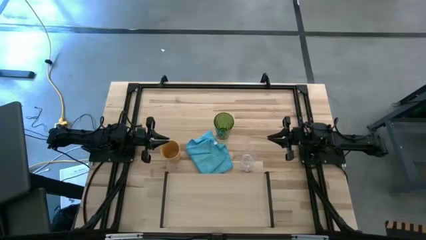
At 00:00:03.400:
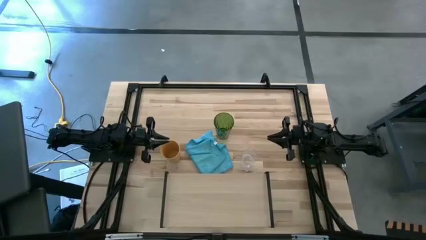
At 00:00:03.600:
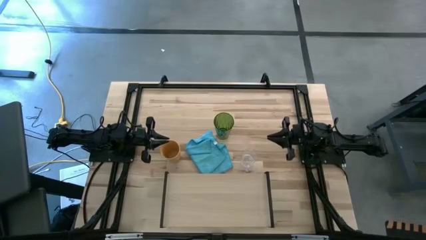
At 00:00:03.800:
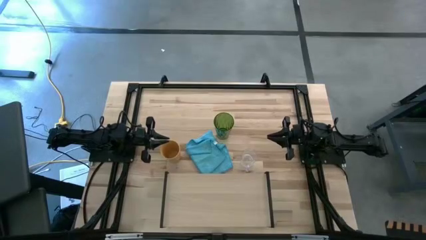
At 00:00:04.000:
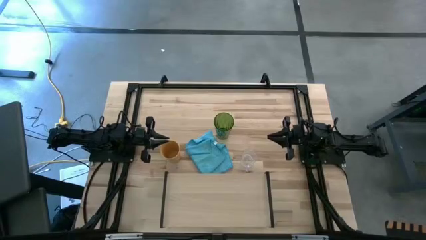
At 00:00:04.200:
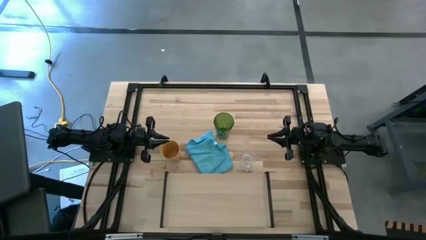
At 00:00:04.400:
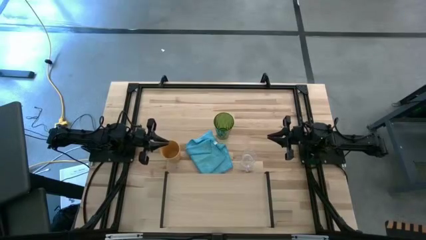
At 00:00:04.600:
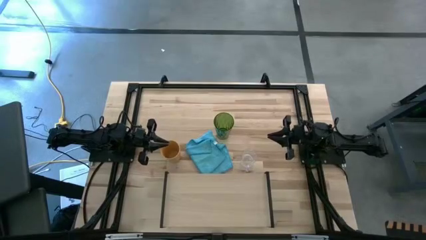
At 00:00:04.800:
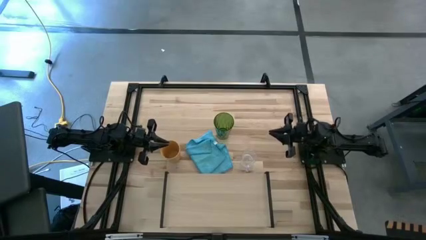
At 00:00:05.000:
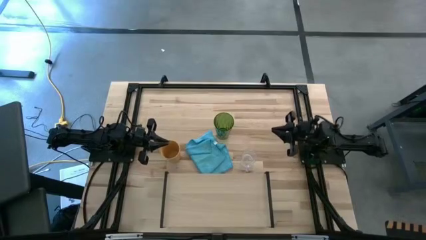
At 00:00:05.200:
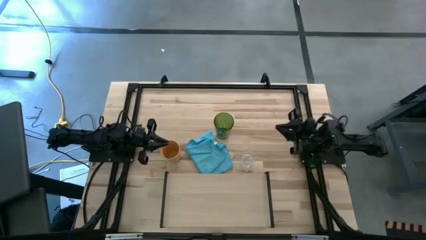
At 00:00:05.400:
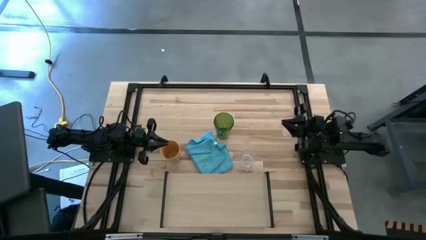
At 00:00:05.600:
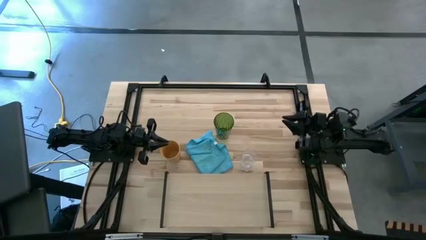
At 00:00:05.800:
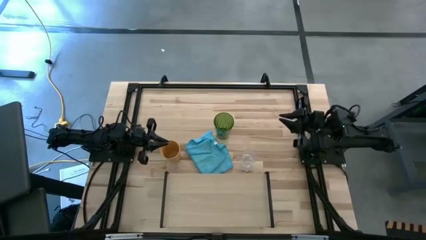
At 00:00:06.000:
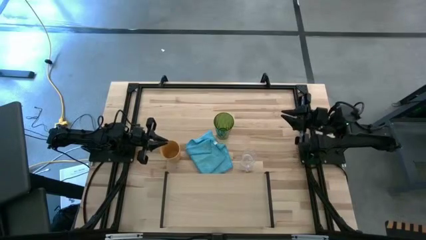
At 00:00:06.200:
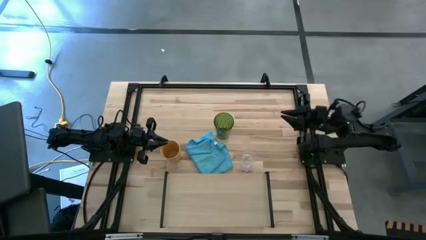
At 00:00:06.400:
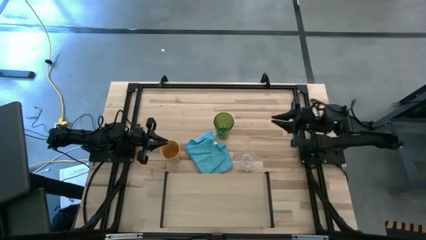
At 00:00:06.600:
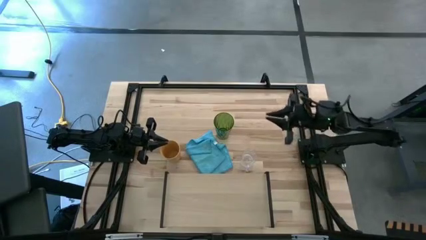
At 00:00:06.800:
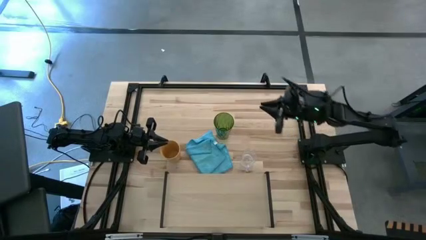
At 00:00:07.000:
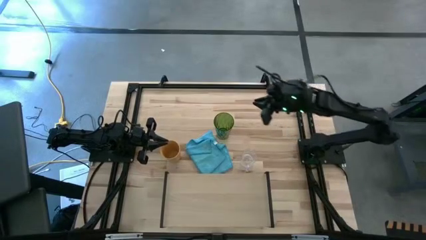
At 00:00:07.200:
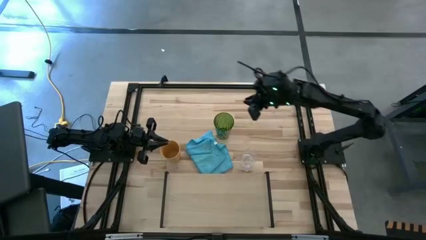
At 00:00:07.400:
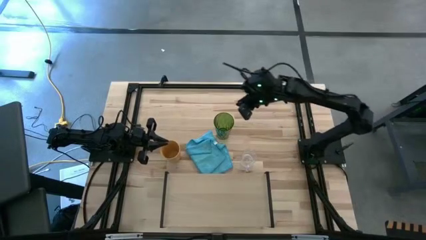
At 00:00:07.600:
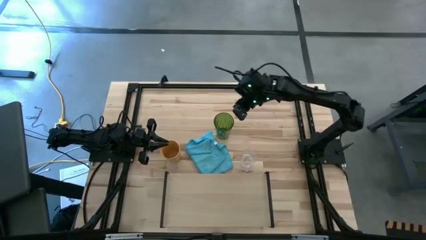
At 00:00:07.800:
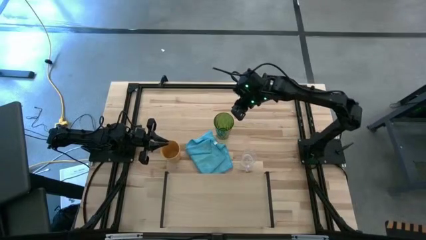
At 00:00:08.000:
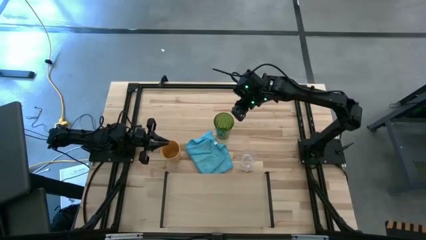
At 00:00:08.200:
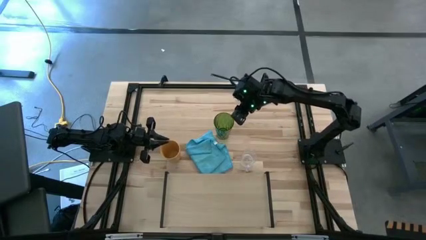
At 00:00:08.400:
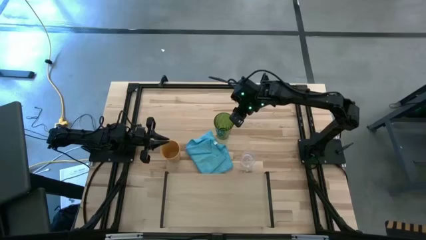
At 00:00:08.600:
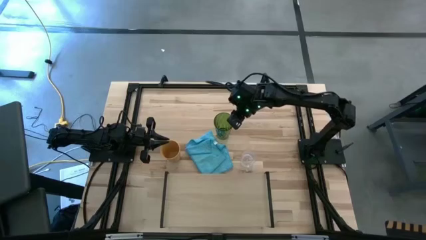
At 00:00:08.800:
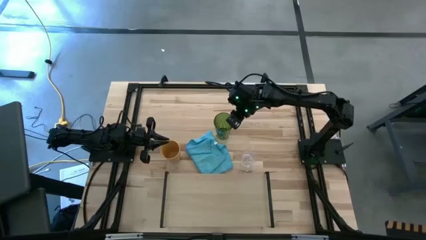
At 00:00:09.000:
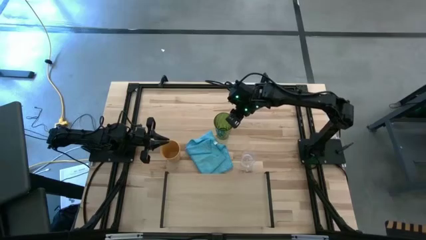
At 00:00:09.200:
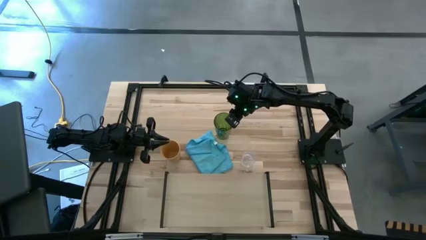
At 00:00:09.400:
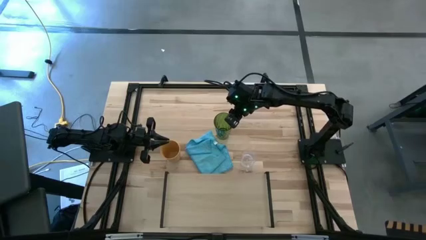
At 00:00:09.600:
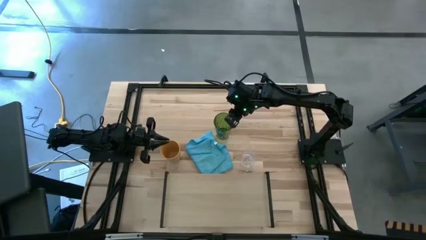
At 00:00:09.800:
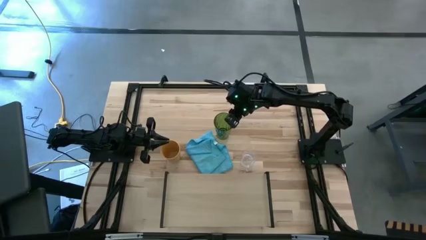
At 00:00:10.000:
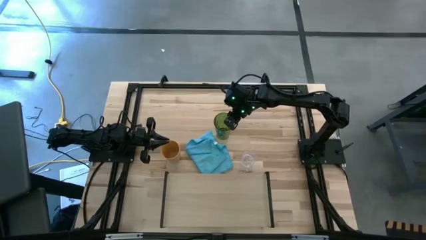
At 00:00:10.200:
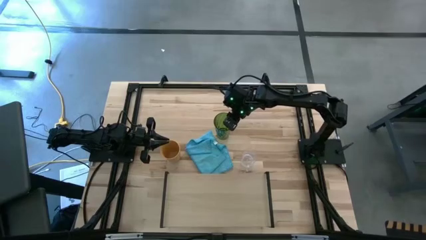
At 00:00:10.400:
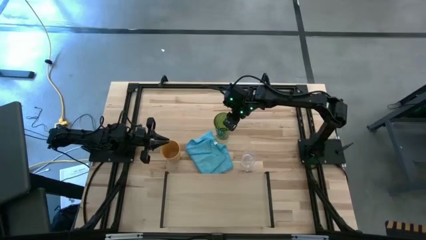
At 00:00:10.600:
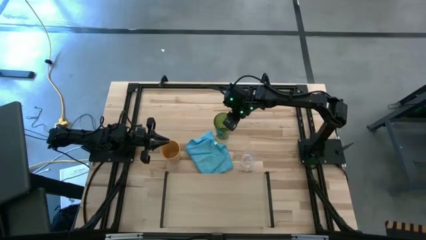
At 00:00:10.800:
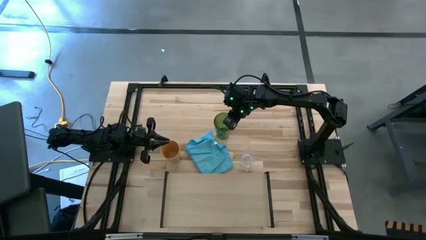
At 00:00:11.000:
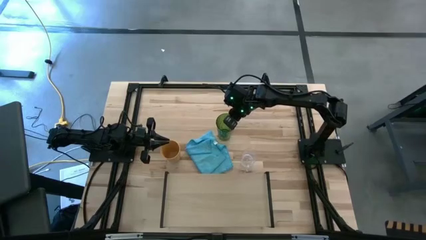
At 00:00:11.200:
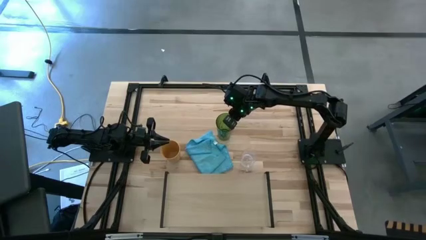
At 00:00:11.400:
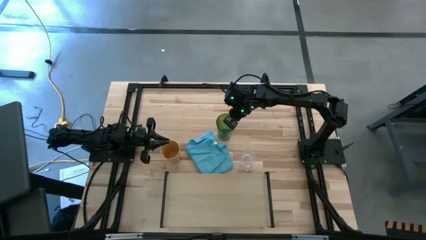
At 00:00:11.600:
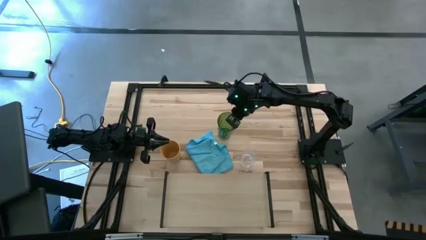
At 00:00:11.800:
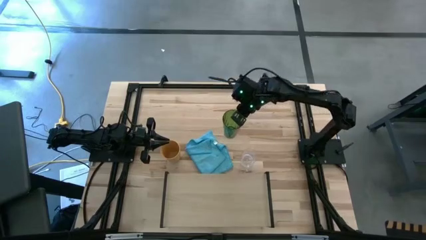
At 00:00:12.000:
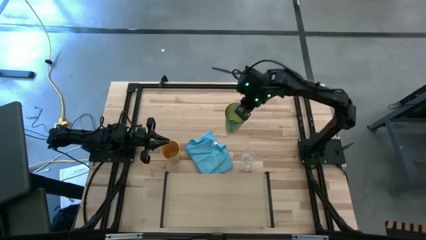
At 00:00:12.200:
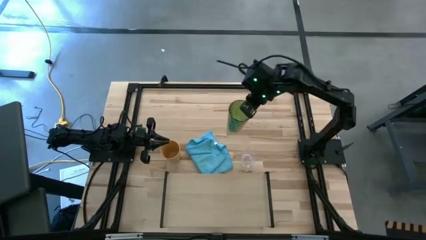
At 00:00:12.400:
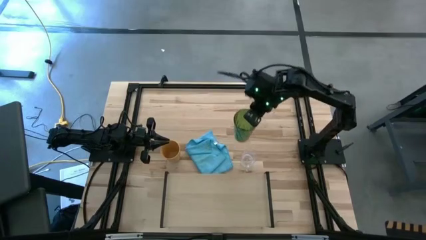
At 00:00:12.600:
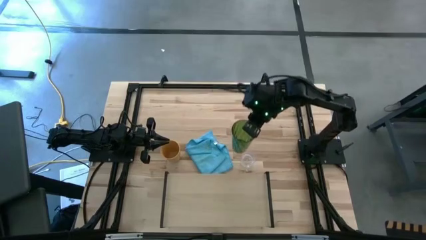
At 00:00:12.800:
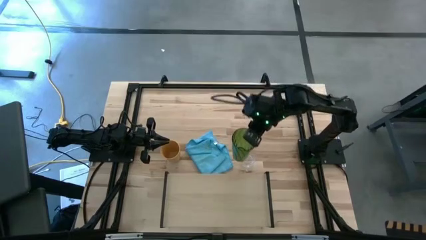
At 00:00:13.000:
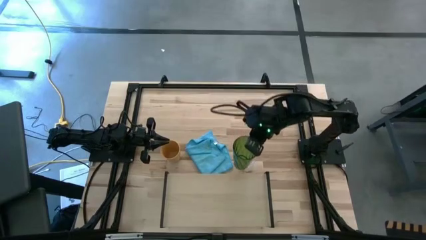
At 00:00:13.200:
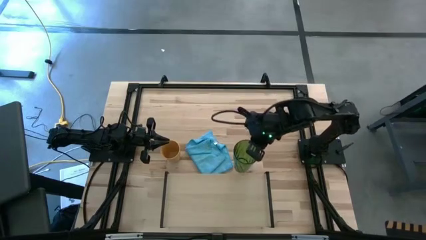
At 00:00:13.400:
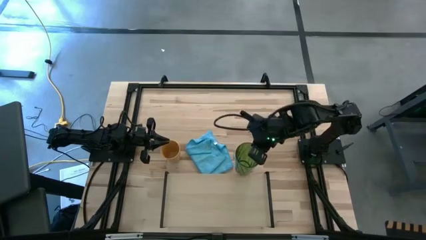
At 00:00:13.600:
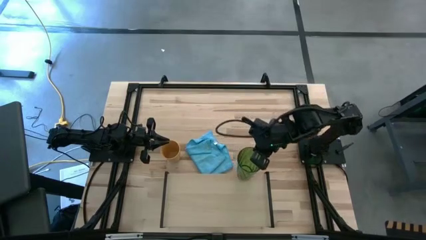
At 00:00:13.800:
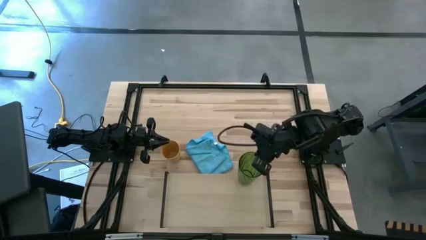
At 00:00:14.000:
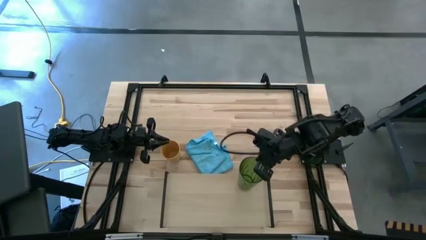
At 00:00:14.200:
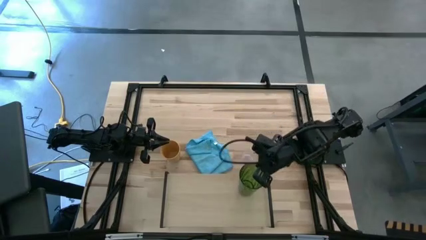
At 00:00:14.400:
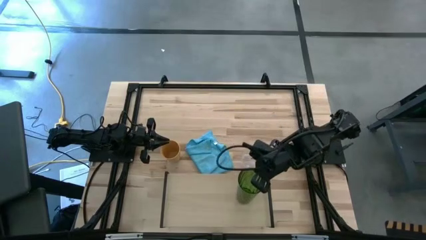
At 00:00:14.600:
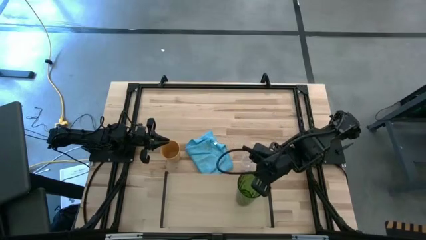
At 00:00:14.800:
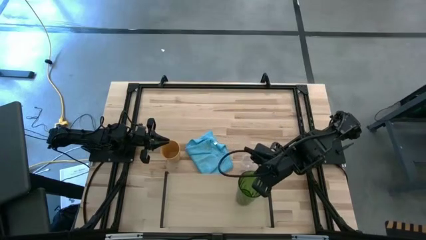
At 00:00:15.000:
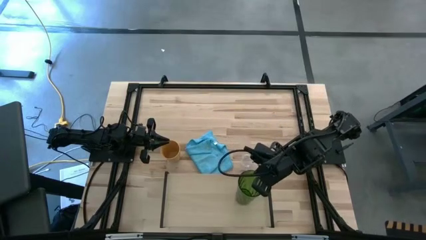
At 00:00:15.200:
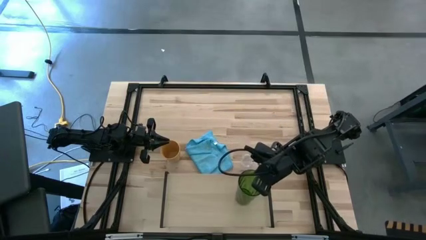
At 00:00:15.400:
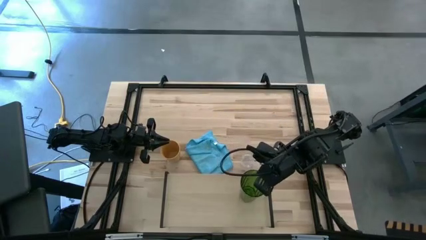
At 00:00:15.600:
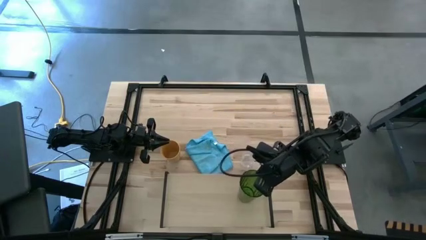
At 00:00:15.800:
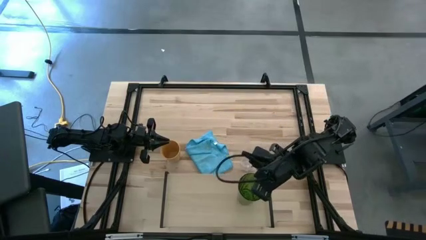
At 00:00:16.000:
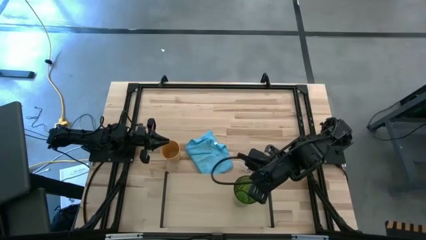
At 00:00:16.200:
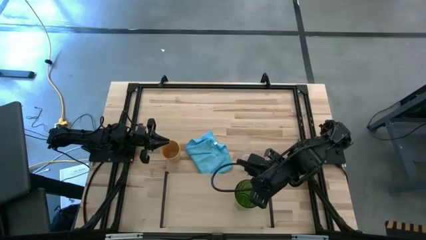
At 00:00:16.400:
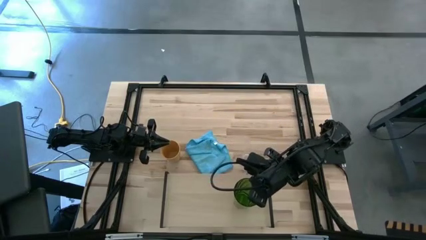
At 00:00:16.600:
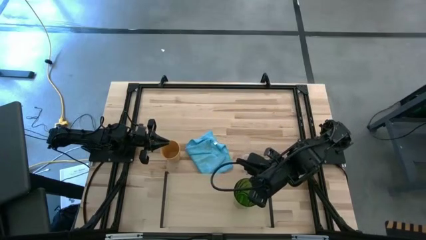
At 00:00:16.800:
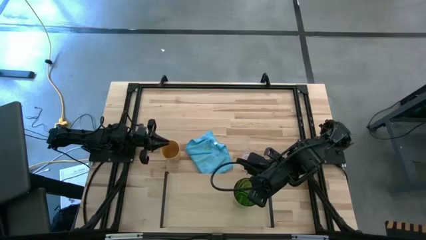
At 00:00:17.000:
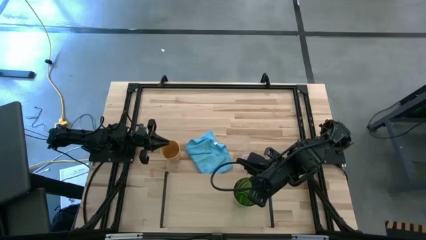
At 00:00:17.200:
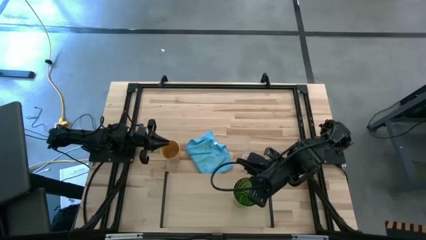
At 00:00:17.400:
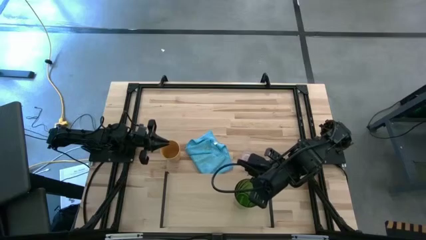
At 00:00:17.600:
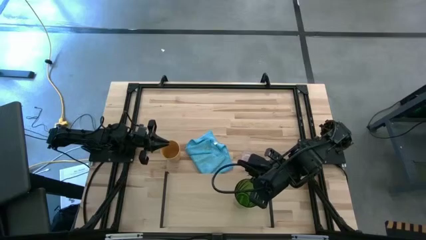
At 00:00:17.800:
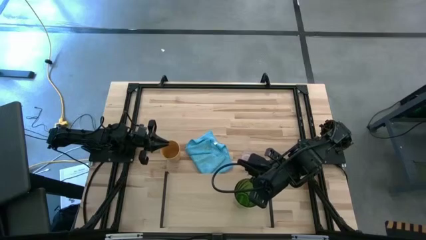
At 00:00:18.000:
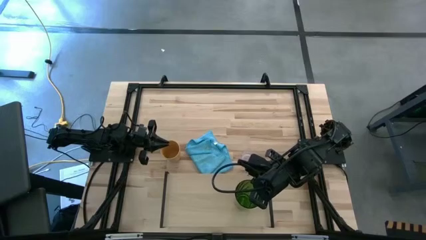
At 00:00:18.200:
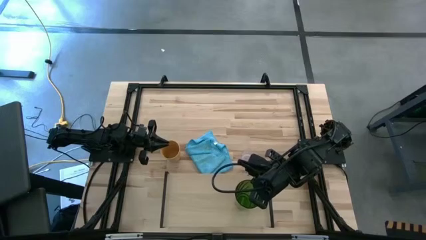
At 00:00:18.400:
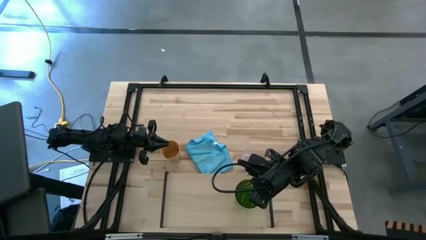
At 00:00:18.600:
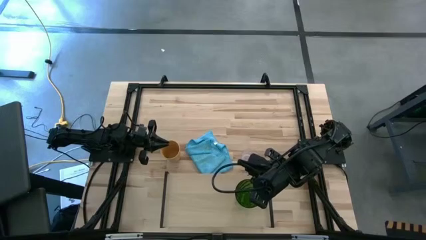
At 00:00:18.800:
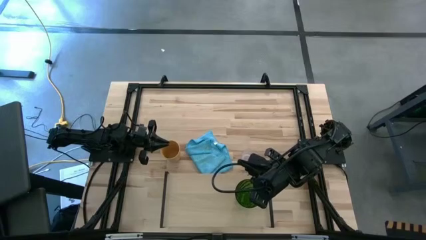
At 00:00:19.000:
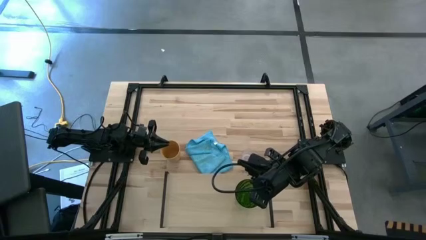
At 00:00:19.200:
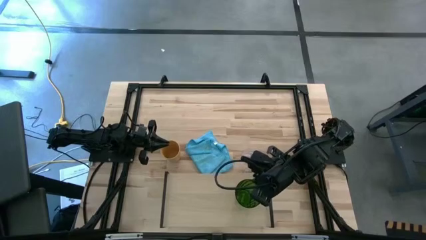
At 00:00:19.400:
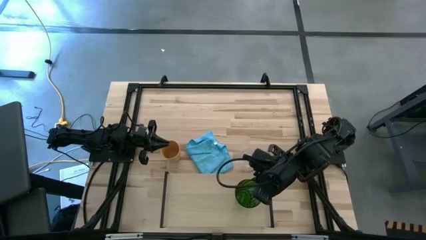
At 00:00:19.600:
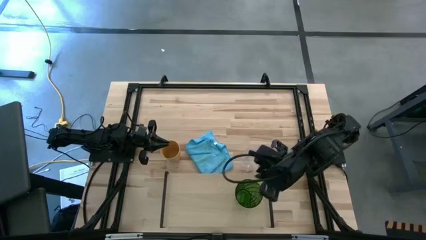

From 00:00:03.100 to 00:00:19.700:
Task: Stack small to large cups/mugs on shelf
Put the green cup on the shelf
